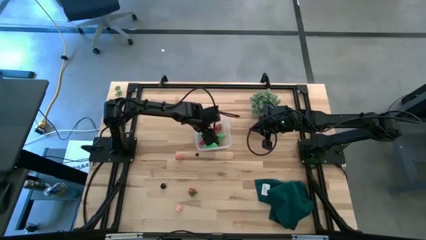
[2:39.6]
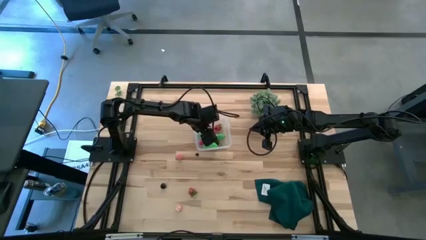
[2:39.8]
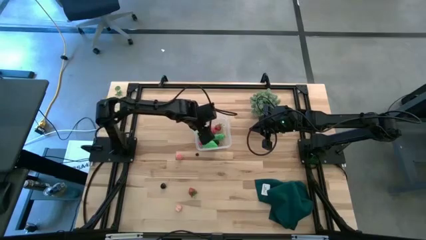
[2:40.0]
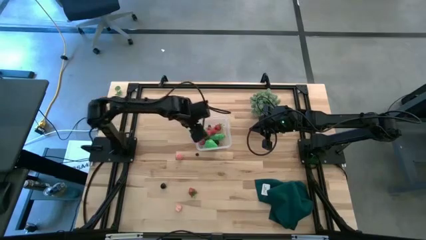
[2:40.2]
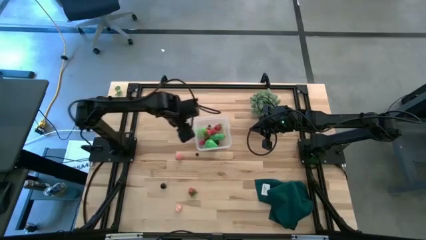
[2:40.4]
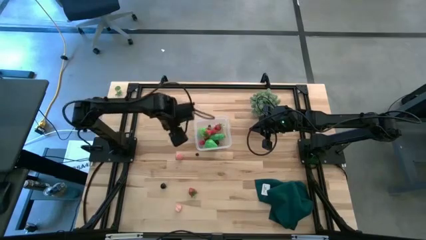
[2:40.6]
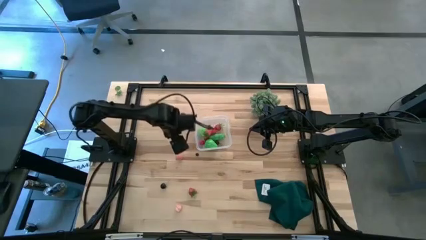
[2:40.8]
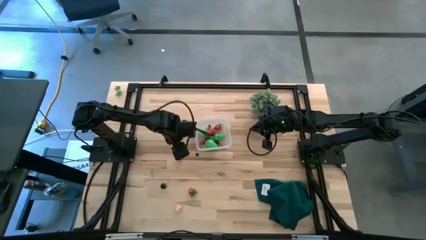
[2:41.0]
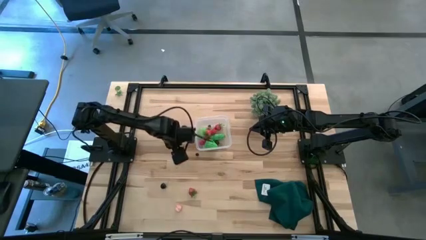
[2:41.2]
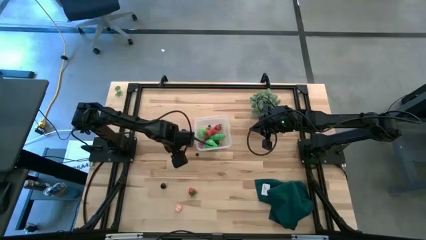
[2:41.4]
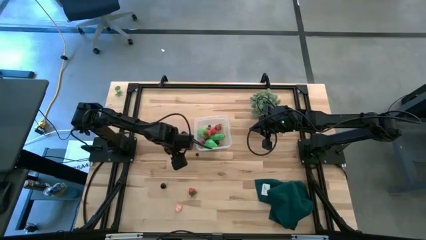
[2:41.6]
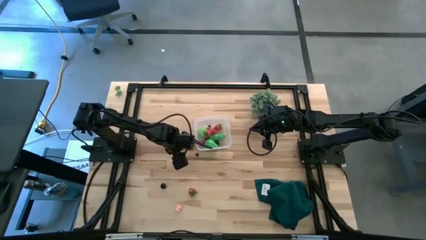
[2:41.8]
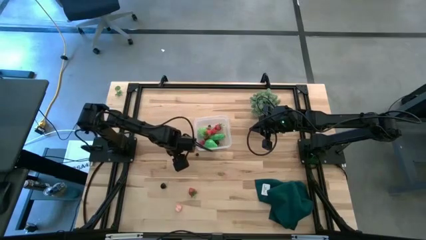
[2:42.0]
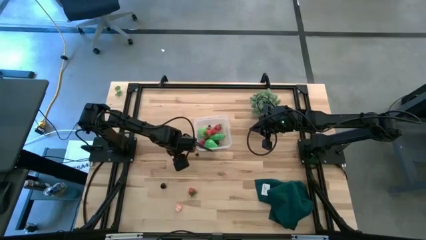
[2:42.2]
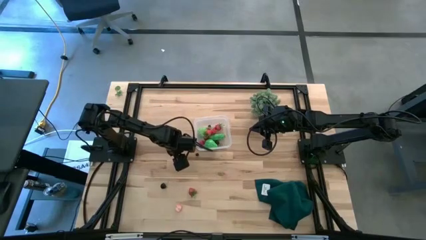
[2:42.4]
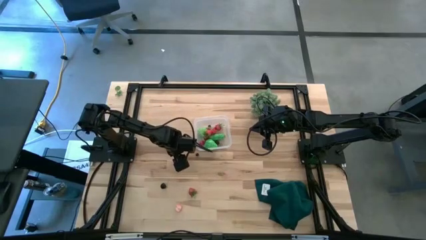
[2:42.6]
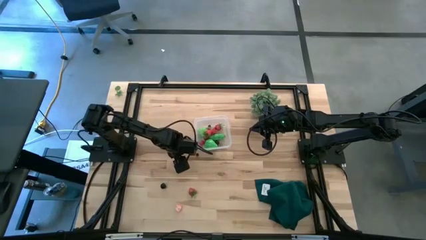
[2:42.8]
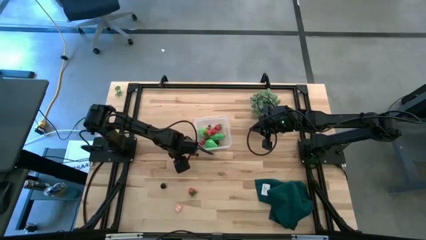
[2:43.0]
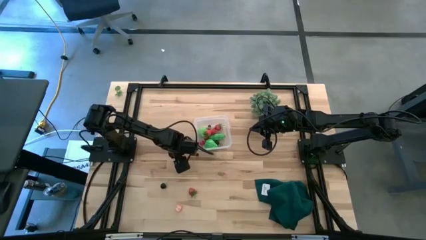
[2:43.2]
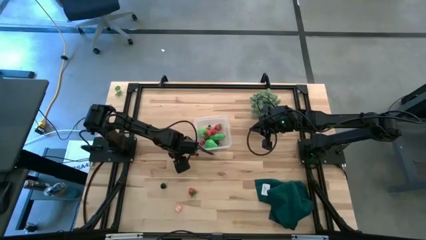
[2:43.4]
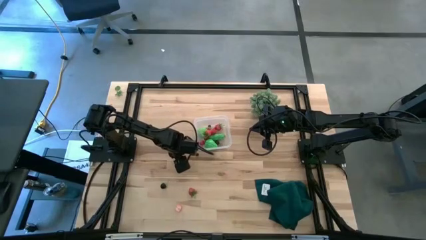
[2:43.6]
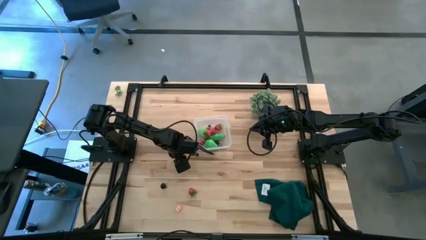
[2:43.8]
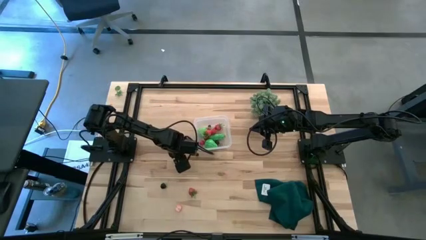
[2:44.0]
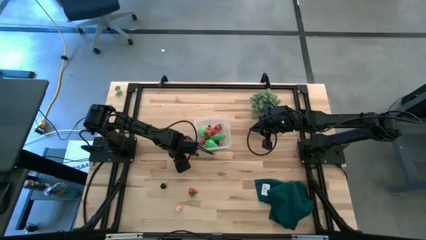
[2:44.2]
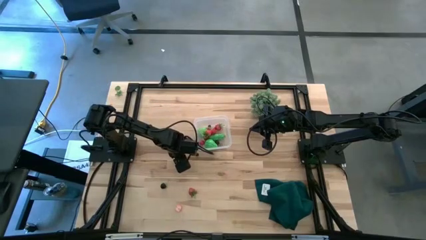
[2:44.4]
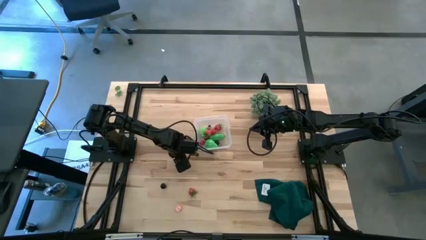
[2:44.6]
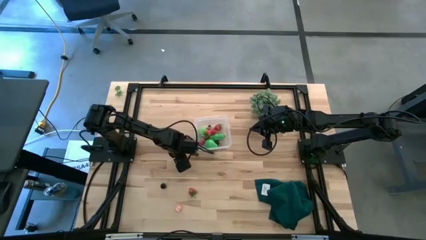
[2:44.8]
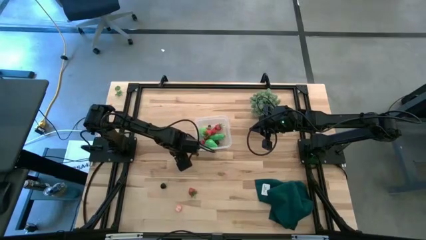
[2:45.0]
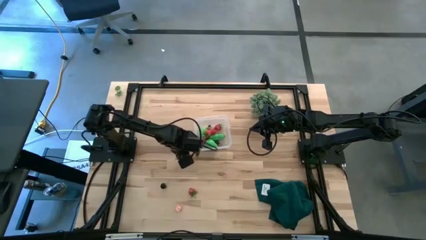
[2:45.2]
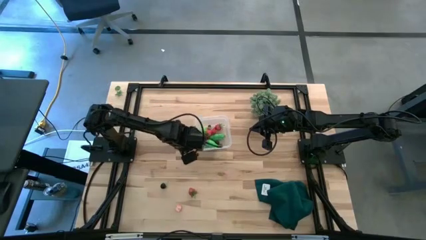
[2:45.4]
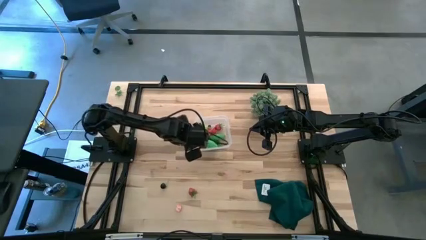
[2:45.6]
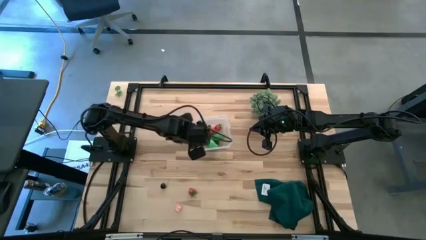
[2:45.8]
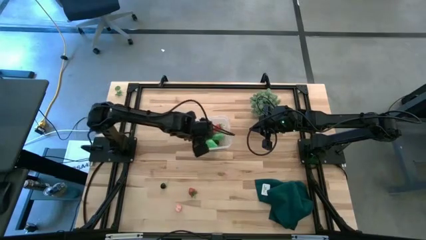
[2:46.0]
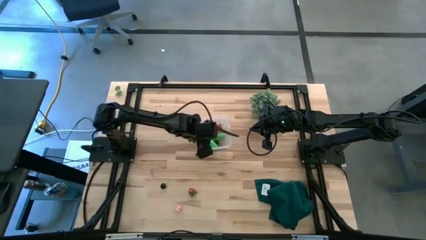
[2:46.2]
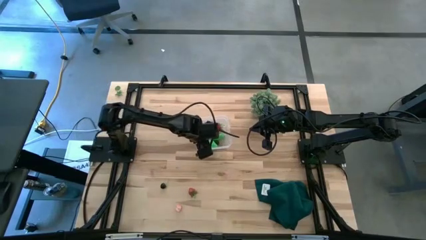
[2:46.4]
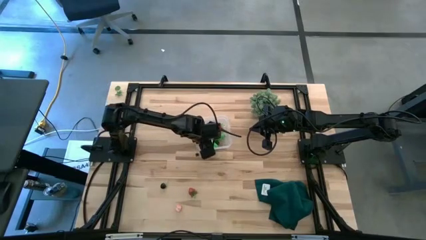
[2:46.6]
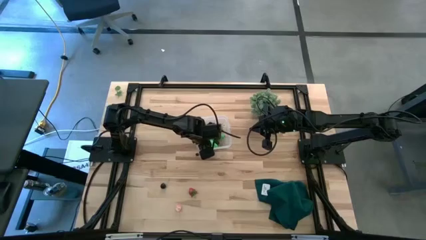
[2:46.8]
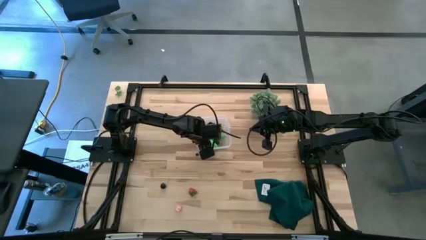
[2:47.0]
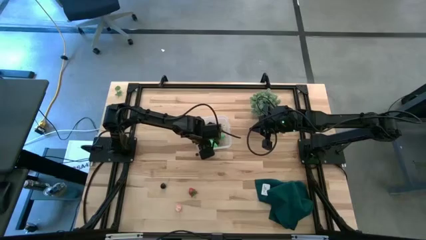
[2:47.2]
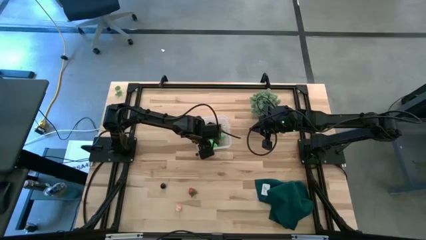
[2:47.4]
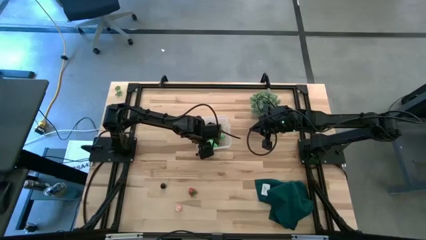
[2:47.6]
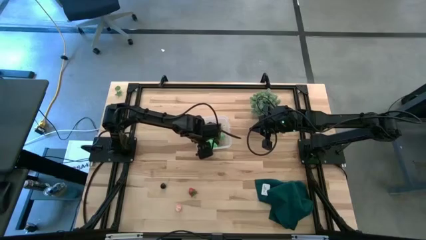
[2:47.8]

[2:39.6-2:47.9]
Task: Pick and placing Produce into tupperware
Put the pink peach into the transparent bin

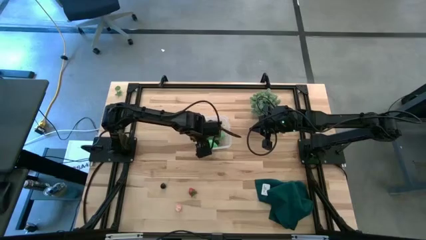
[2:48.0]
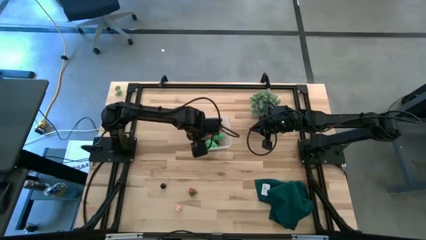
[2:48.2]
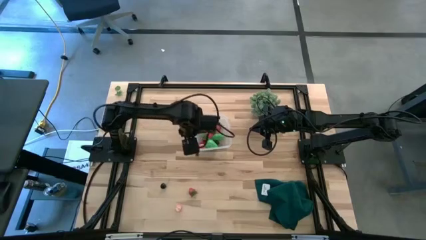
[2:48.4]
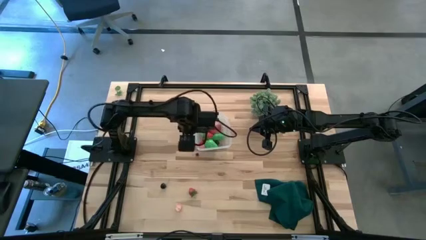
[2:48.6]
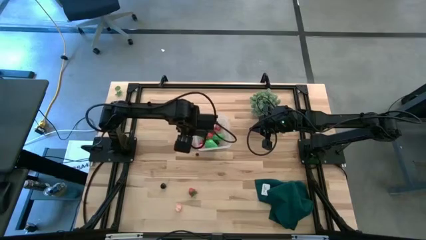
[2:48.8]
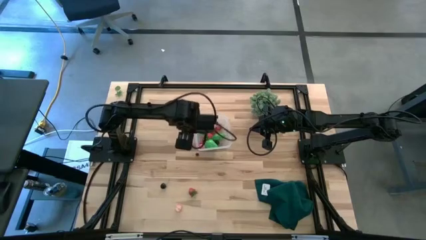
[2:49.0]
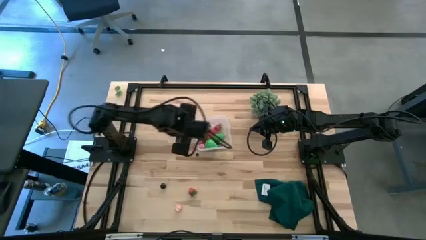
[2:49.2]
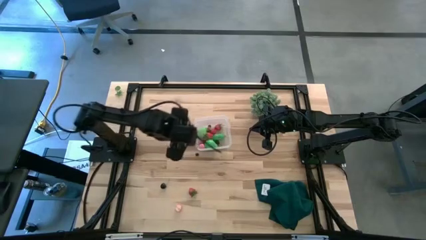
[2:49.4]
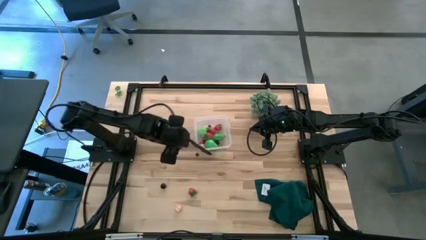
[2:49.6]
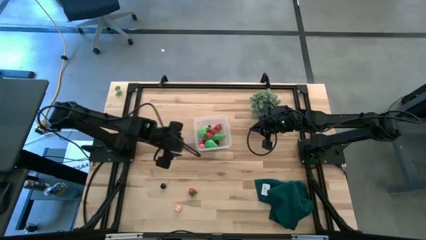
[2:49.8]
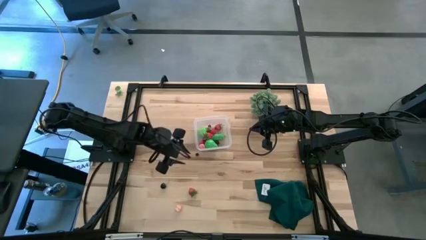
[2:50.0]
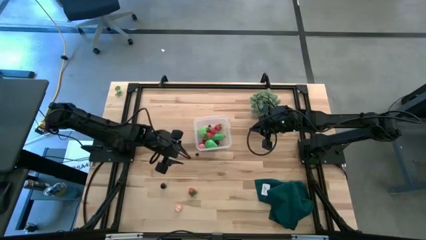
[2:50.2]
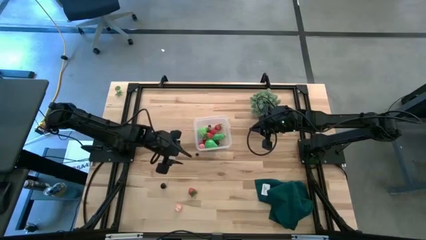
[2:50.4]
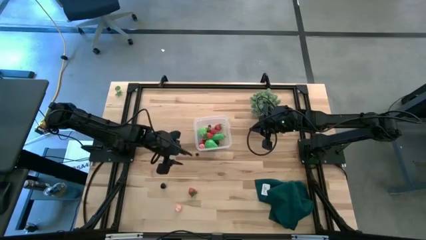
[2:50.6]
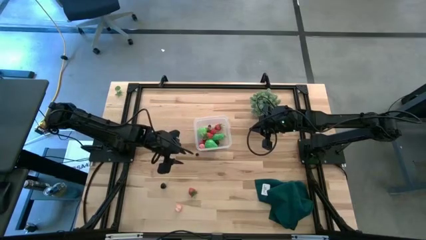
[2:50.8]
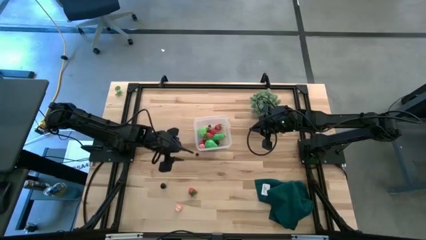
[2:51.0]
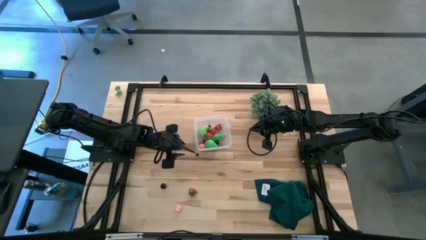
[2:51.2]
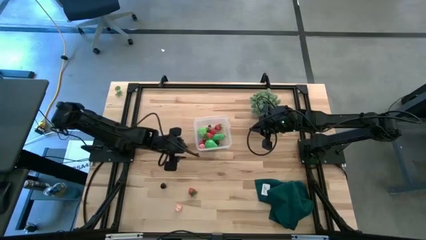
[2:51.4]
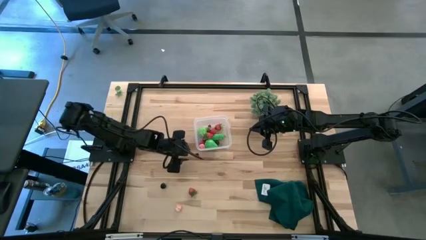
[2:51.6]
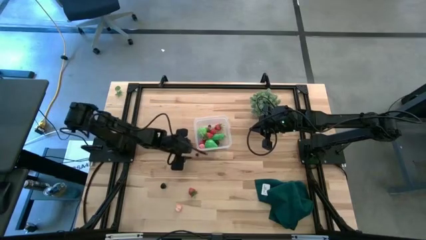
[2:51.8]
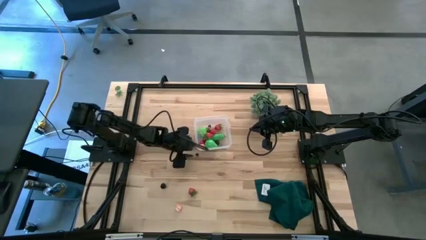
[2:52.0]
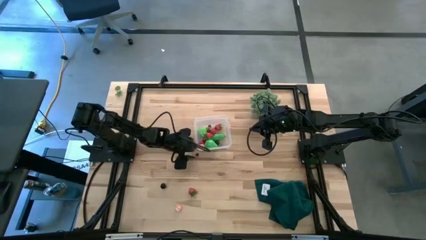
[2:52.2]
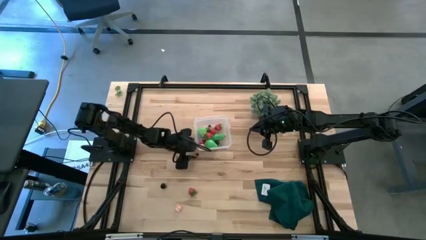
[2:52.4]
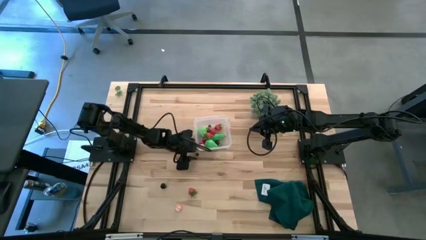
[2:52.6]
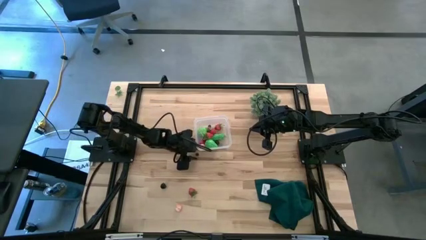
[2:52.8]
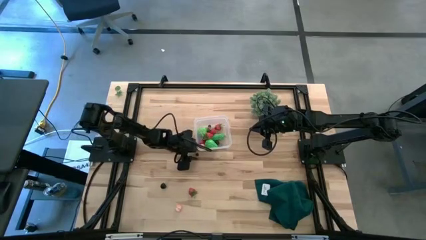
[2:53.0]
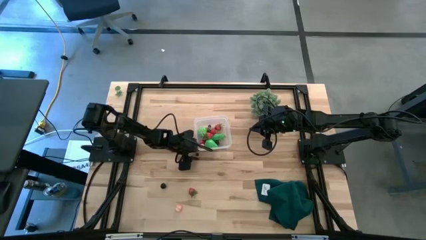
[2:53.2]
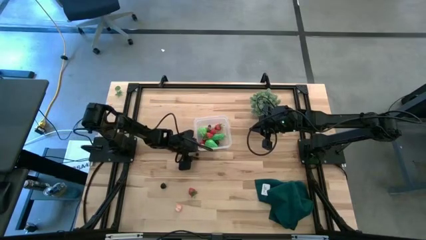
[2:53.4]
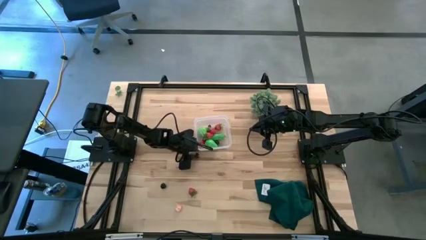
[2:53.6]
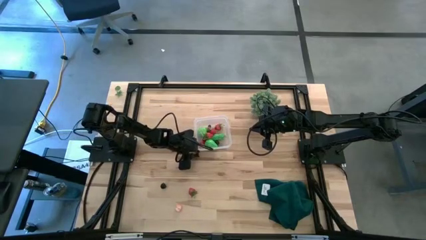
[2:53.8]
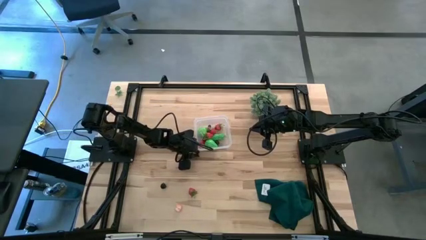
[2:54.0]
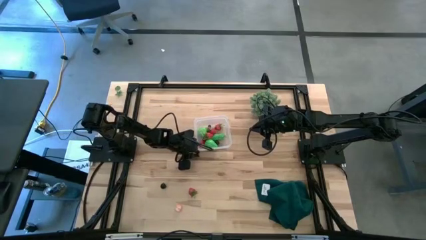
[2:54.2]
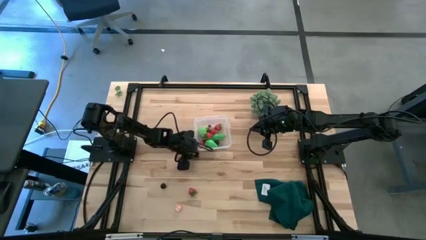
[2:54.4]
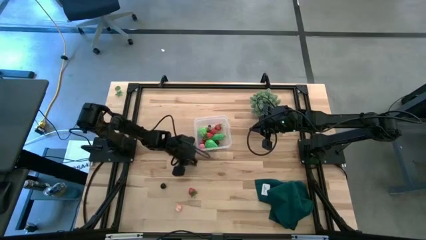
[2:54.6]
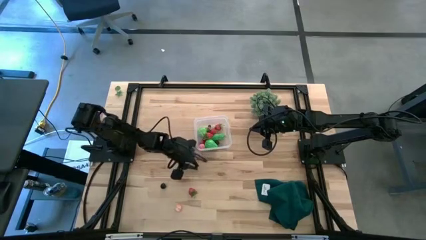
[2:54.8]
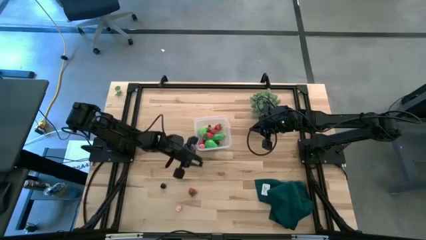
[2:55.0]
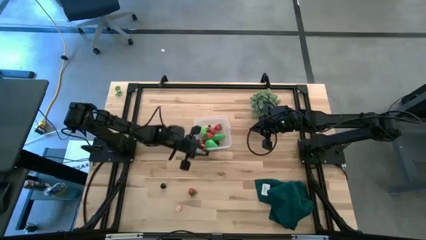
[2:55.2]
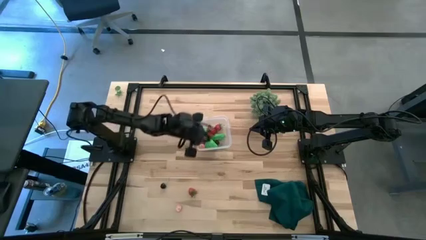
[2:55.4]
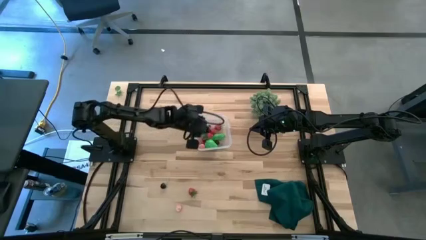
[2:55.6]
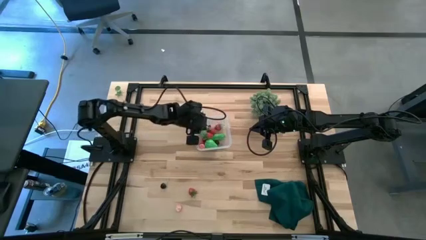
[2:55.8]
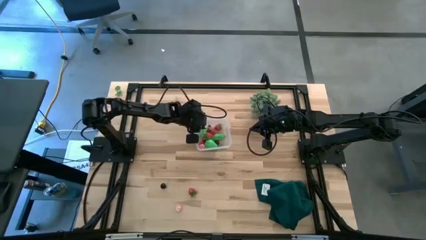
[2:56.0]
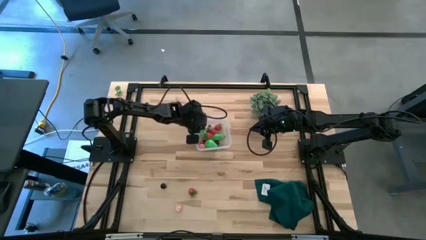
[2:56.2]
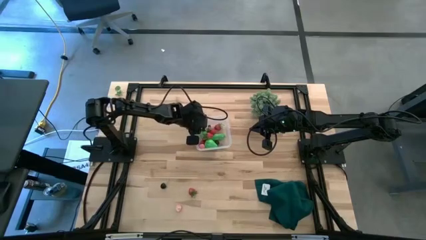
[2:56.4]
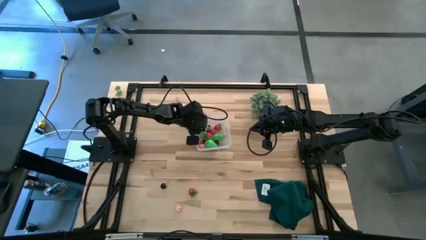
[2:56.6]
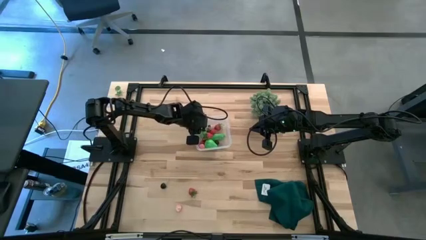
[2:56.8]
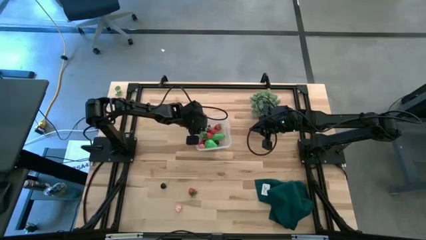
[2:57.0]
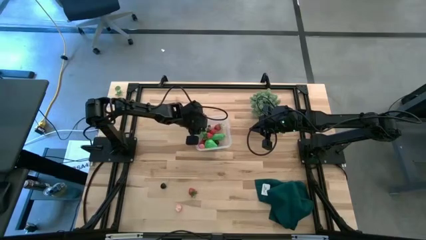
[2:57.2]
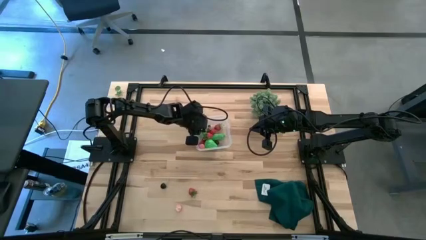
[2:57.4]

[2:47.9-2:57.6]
Put the black olive into the transparent bin
